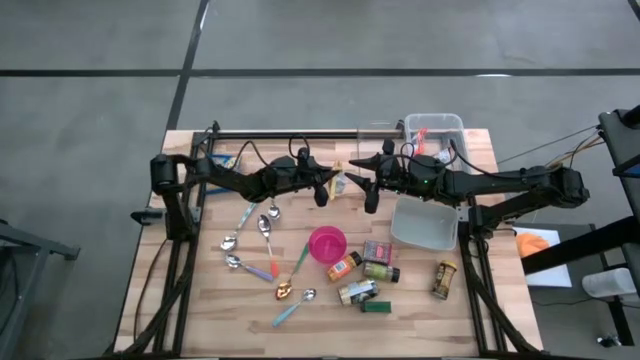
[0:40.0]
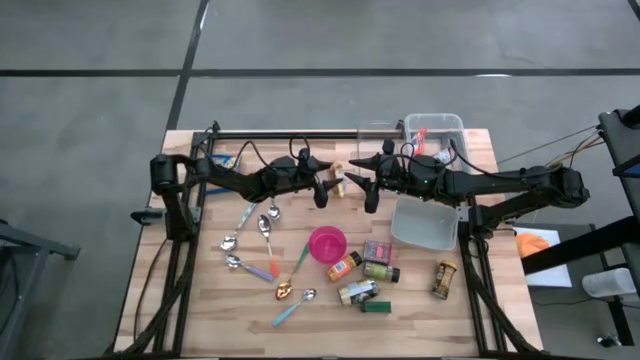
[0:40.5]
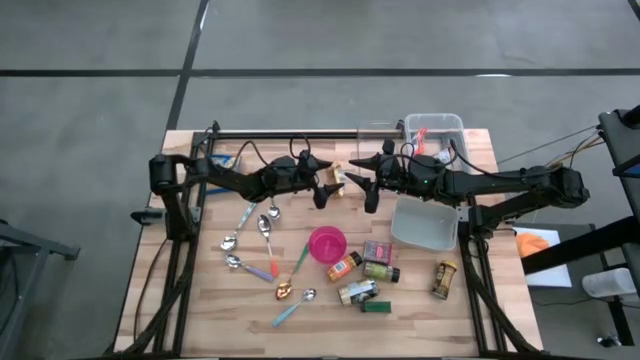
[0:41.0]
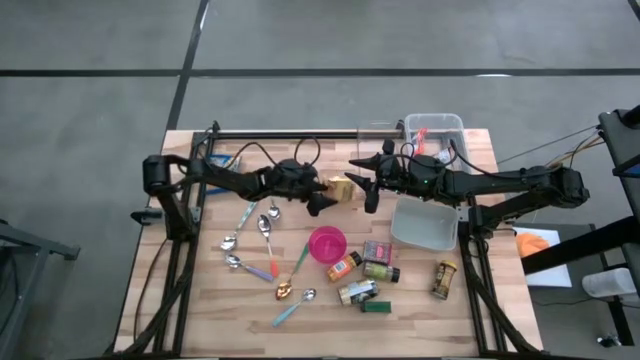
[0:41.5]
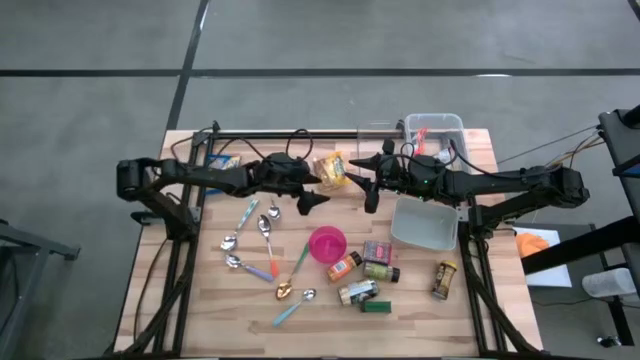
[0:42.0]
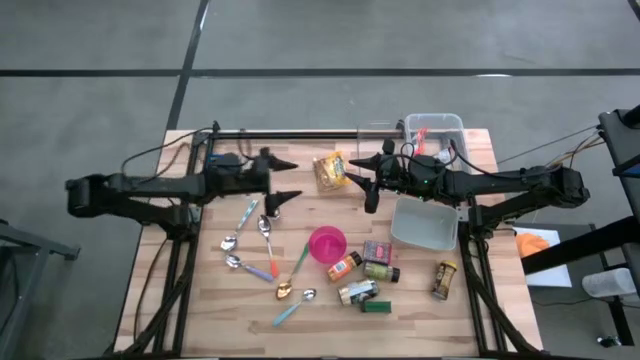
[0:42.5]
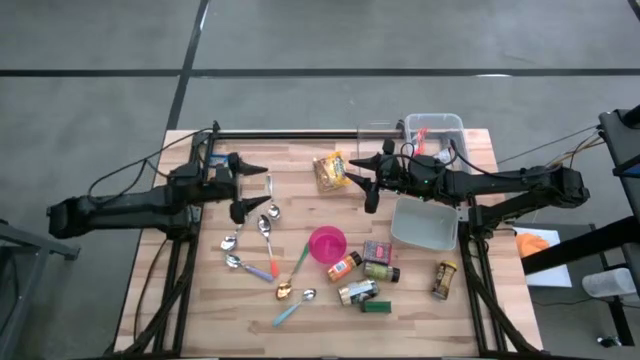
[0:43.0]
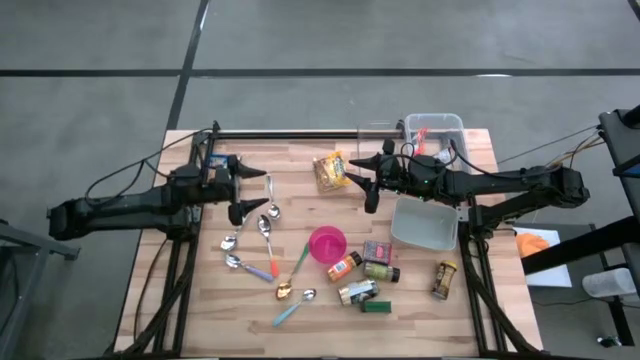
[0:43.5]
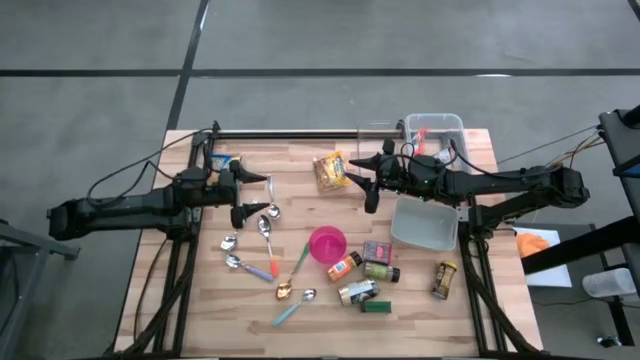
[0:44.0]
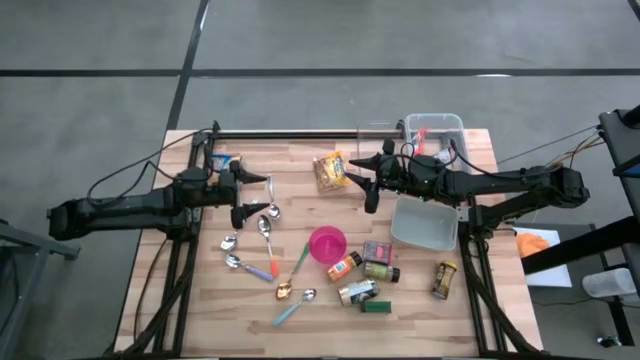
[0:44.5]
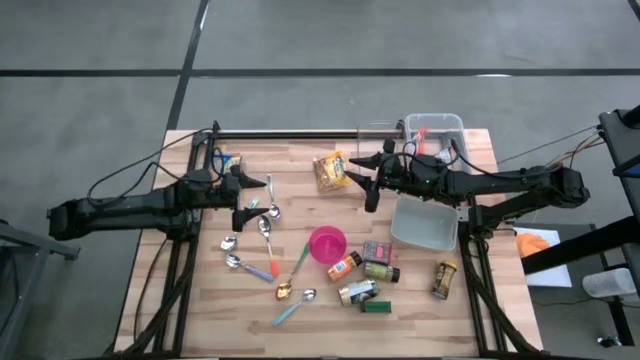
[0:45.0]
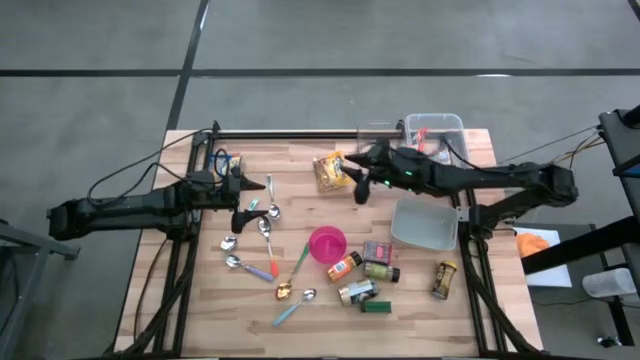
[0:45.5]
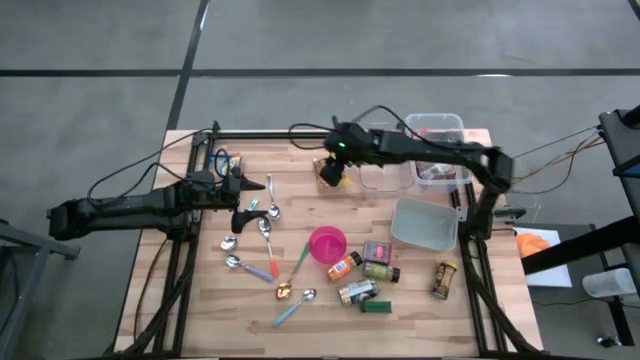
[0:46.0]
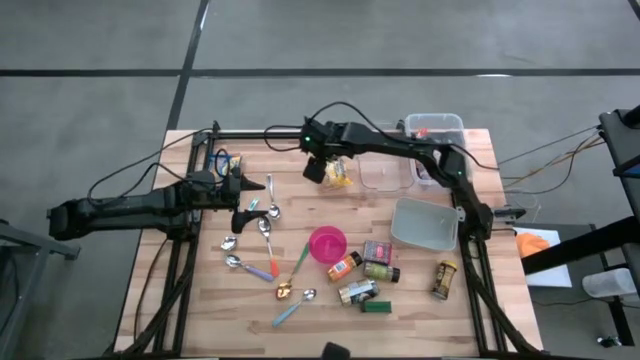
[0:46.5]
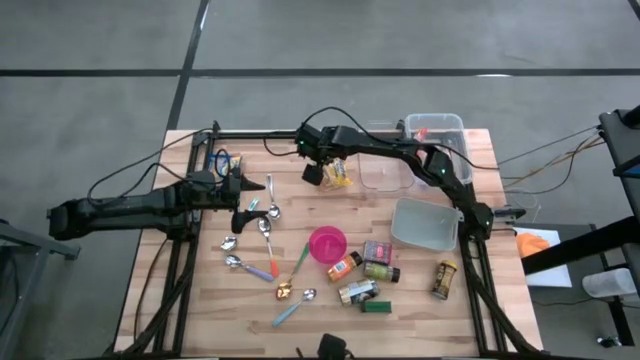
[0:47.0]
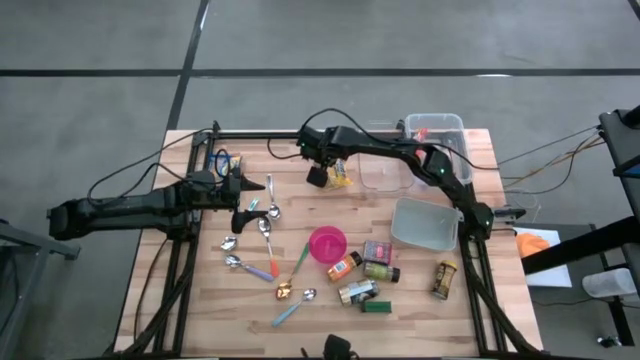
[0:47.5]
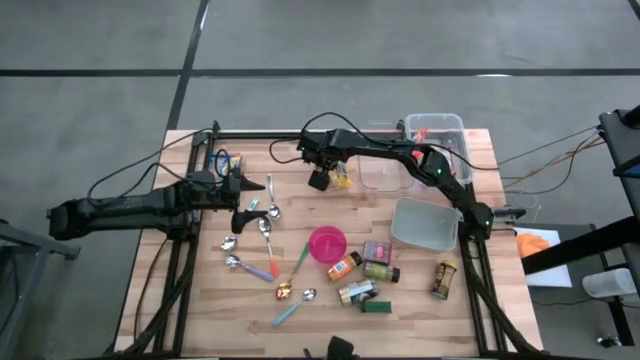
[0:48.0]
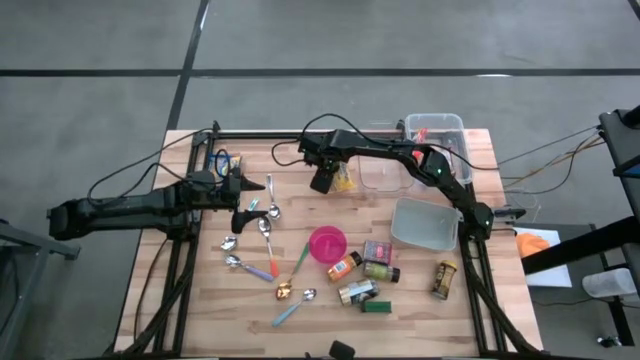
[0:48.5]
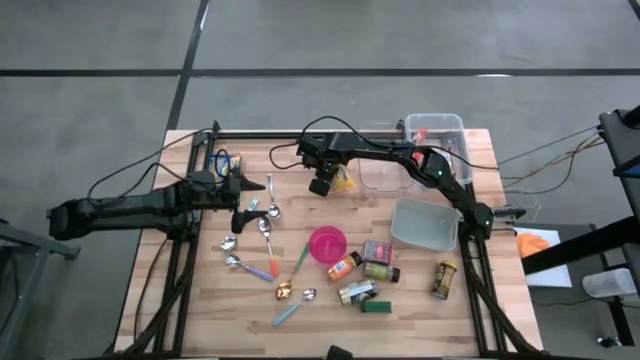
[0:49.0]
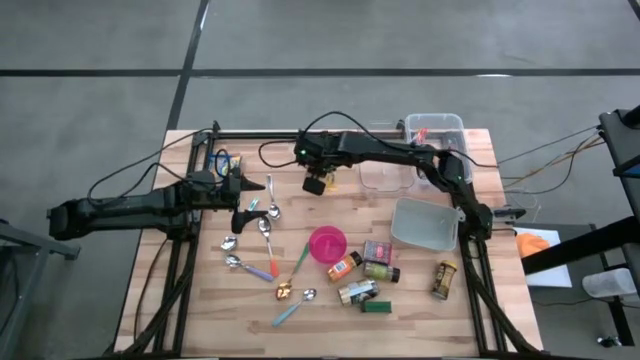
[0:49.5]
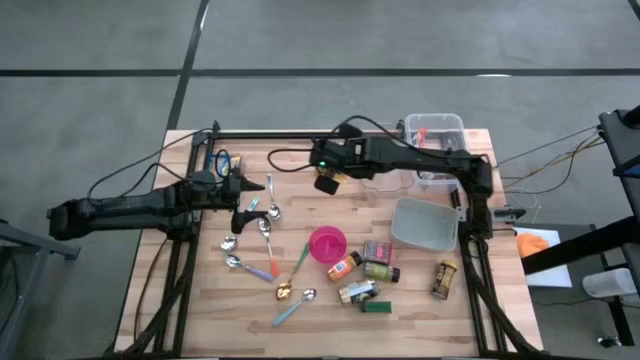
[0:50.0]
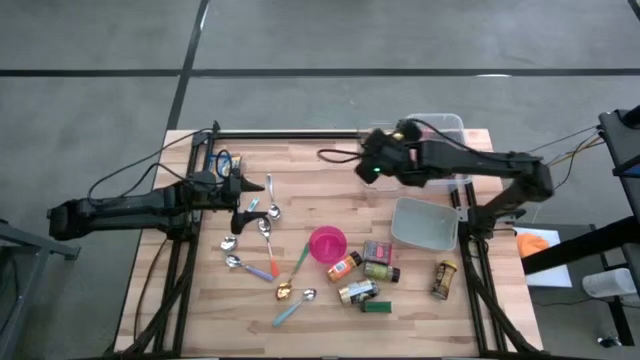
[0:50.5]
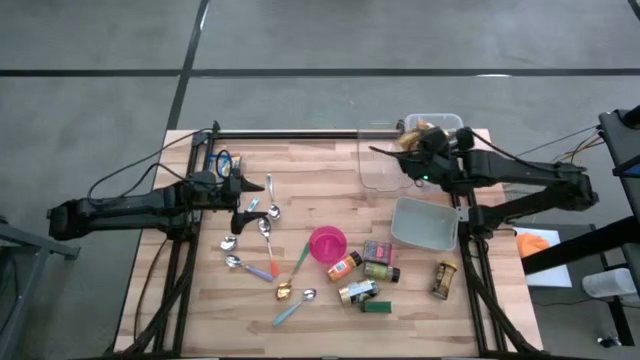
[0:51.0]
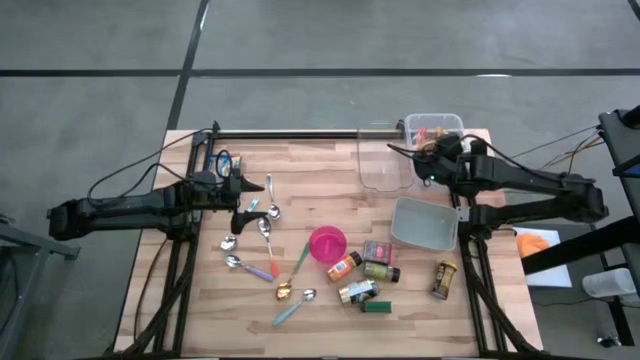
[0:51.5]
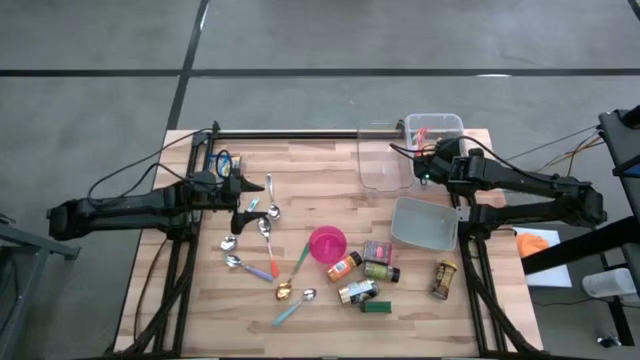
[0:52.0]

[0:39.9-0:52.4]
Put the yellow noodle pack into the white bin

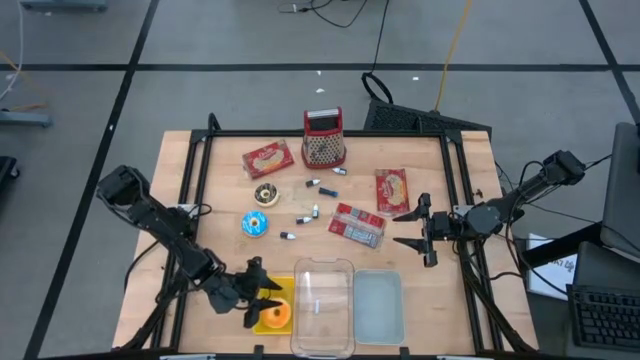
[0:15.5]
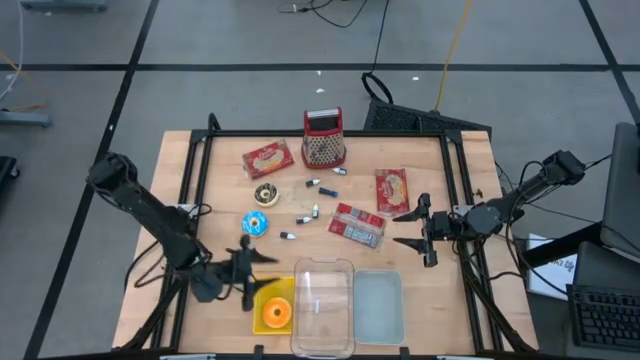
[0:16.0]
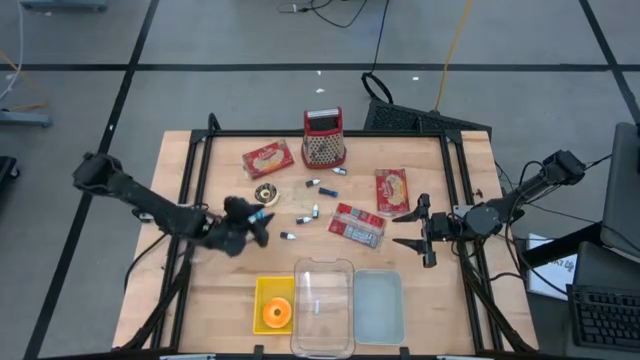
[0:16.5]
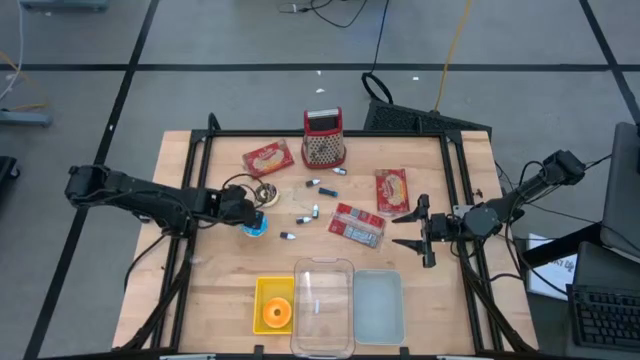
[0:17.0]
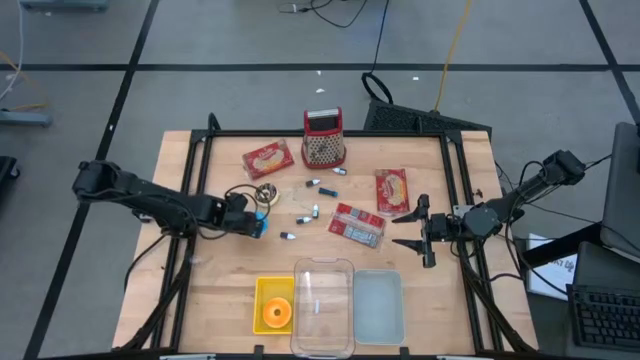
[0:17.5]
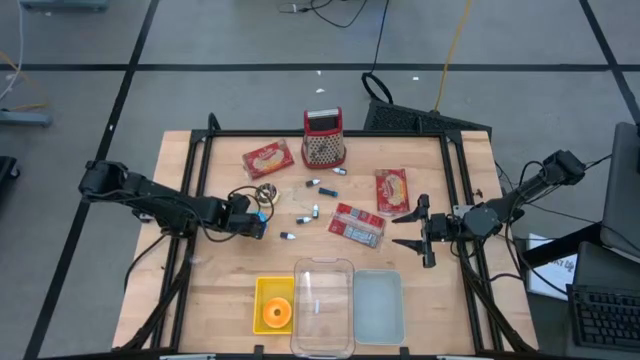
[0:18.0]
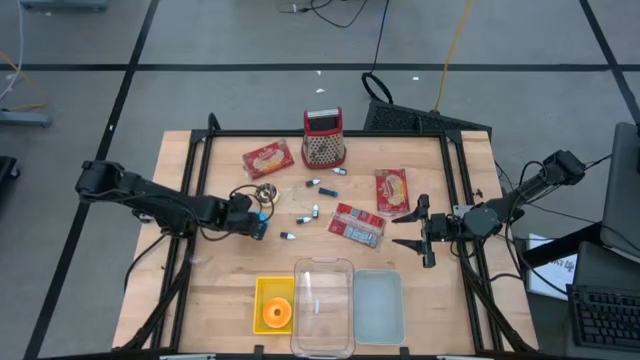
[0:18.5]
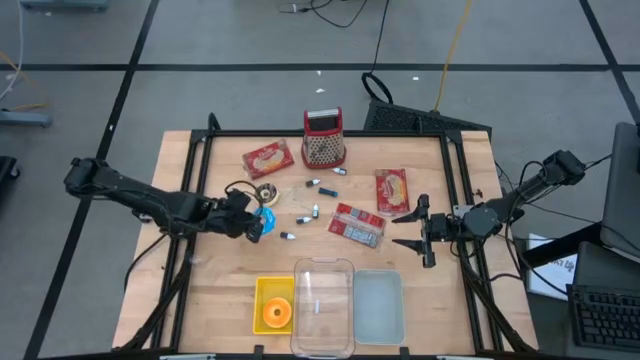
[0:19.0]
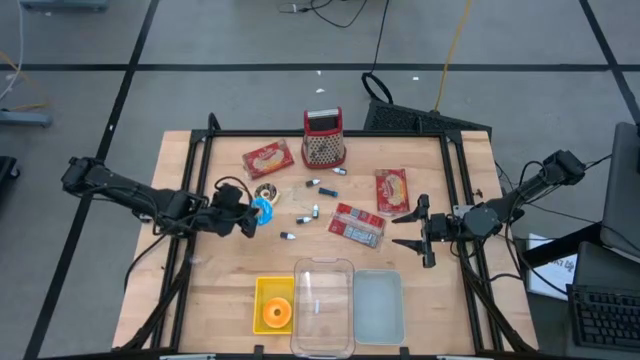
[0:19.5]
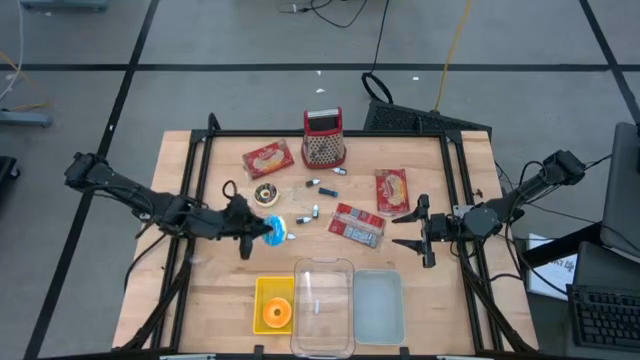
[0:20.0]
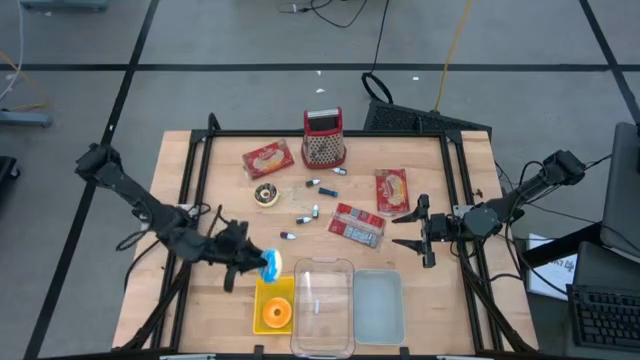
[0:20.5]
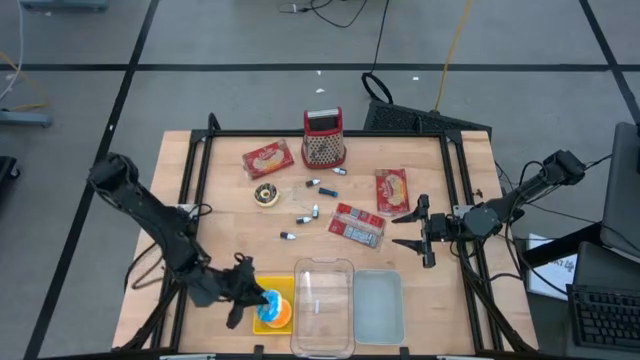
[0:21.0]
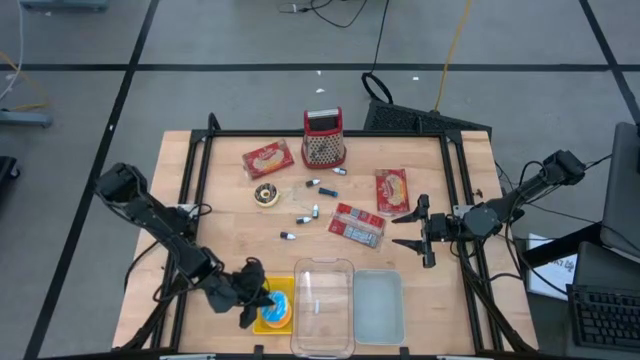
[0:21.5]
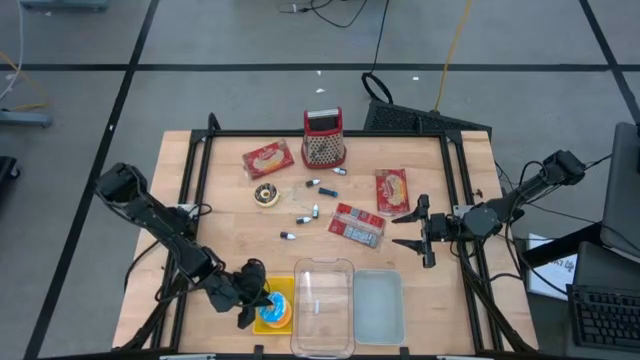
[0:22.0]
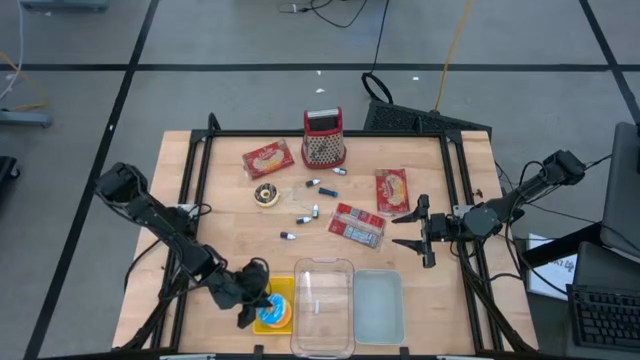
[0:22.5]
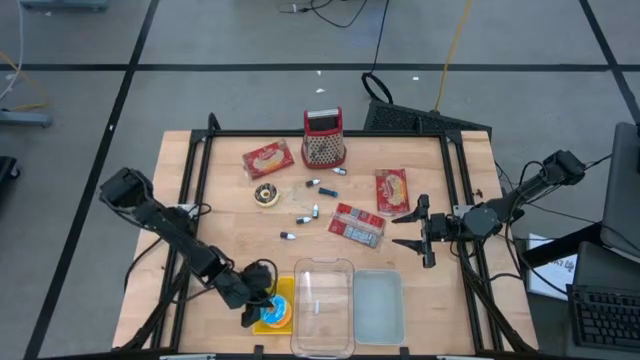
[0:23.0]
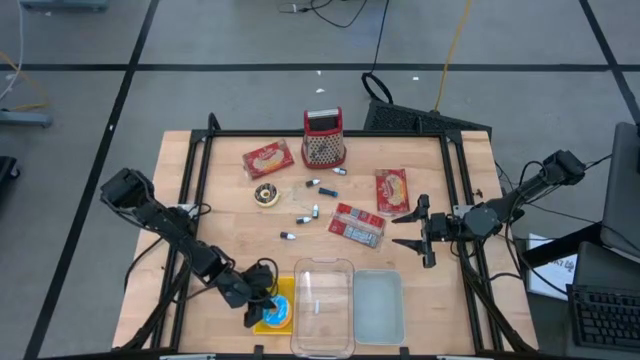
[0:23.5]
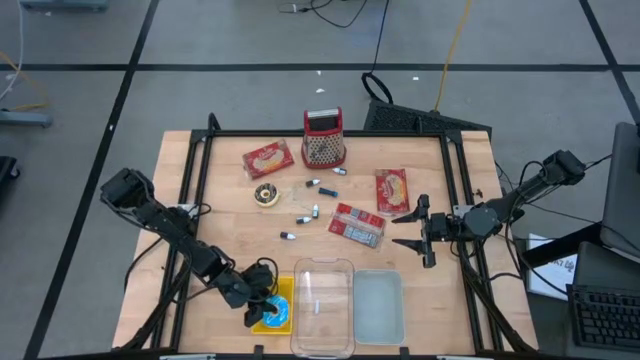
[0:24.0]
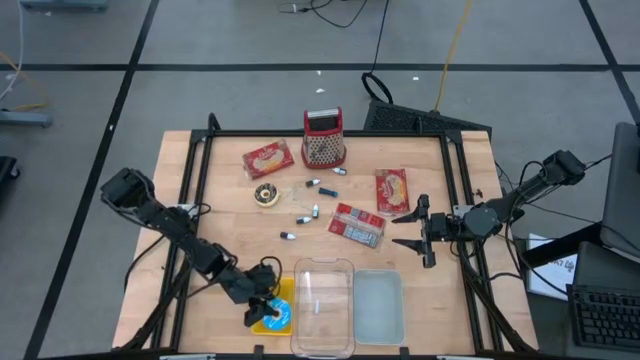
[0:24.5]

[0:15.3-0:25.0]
Put the blue donut into the yellow bin
